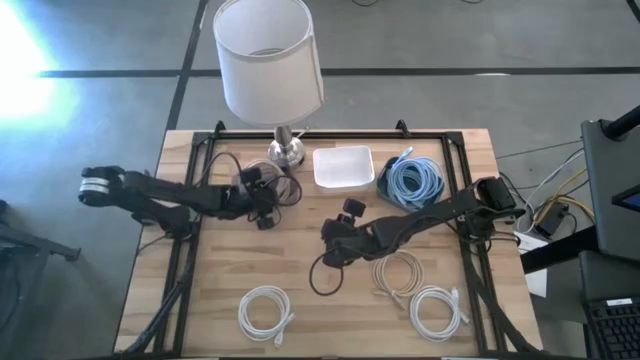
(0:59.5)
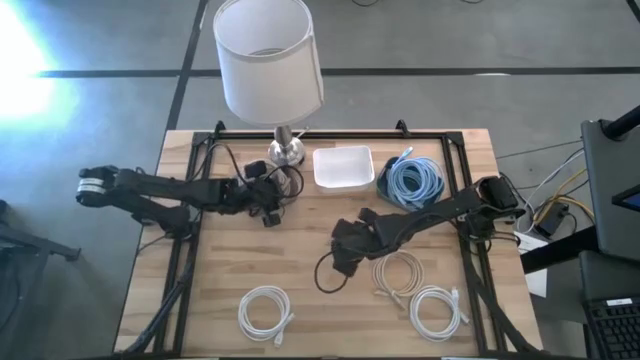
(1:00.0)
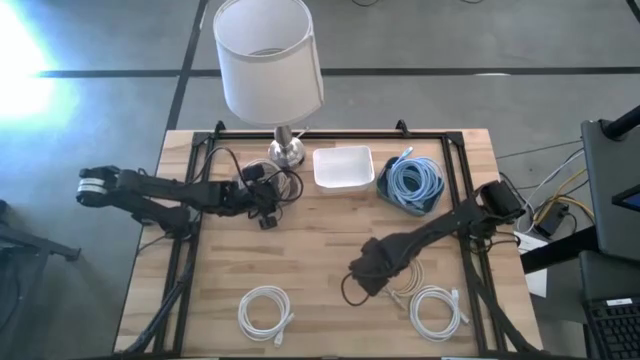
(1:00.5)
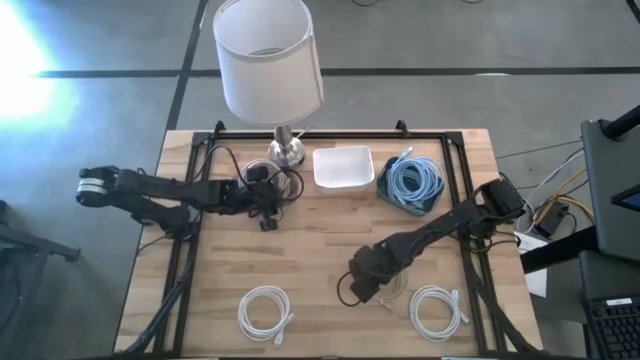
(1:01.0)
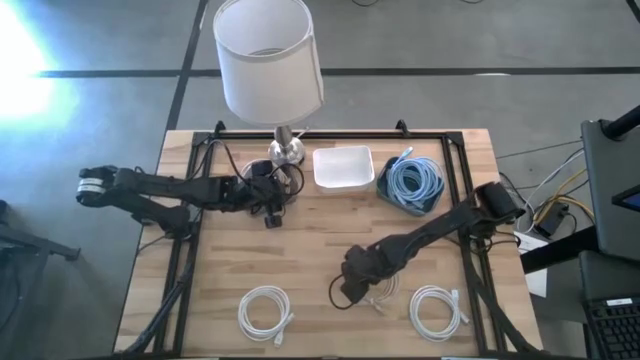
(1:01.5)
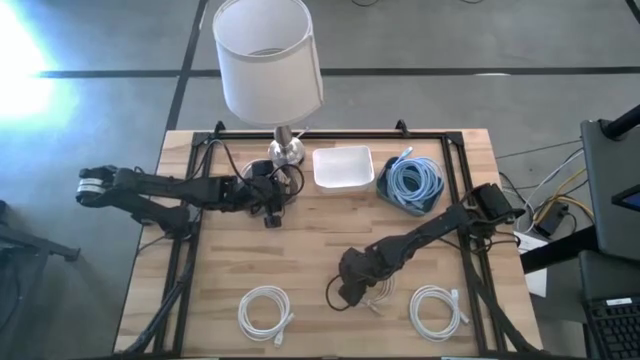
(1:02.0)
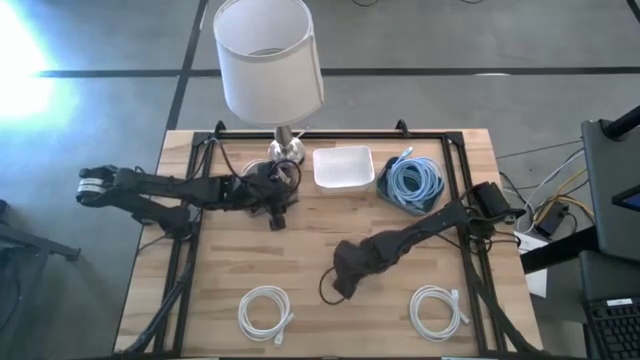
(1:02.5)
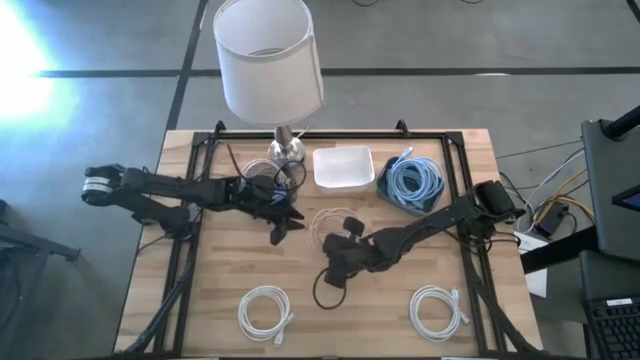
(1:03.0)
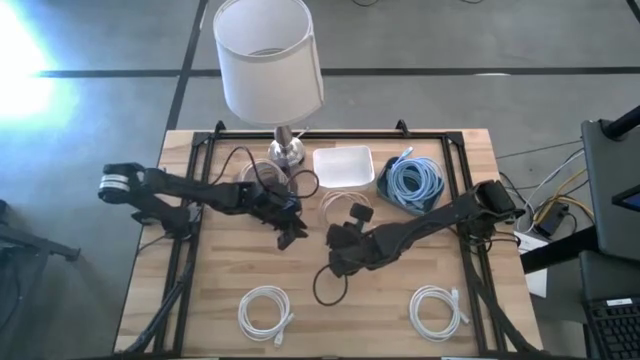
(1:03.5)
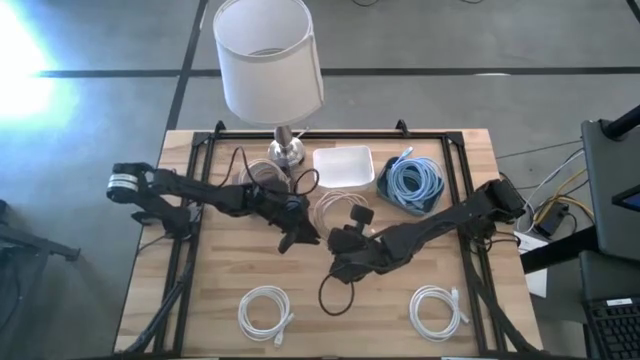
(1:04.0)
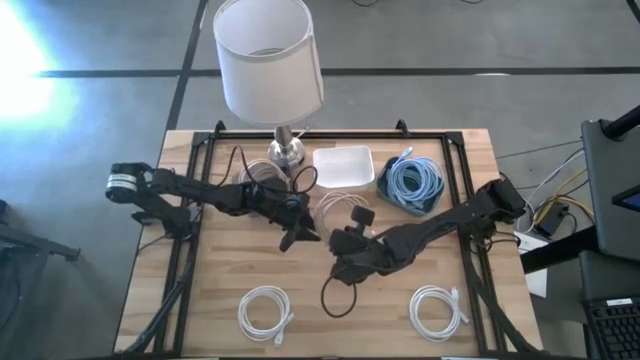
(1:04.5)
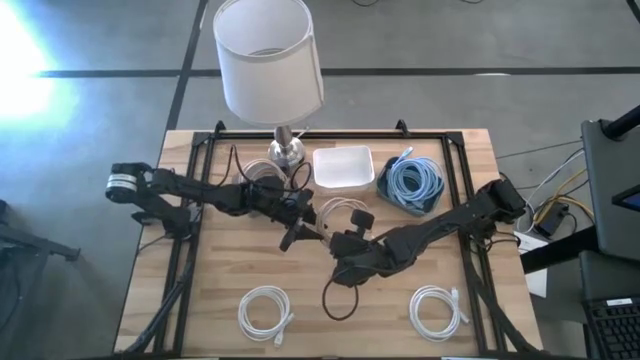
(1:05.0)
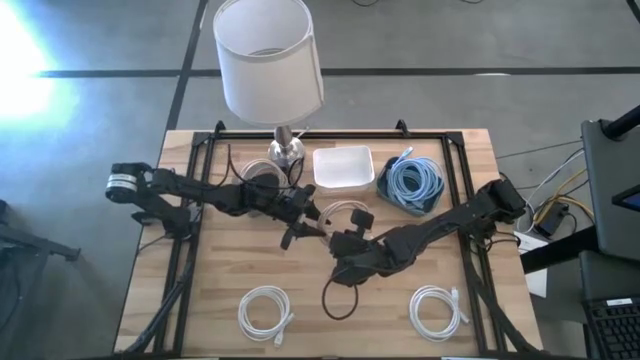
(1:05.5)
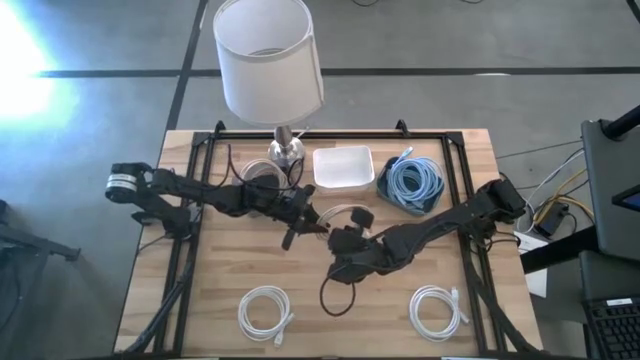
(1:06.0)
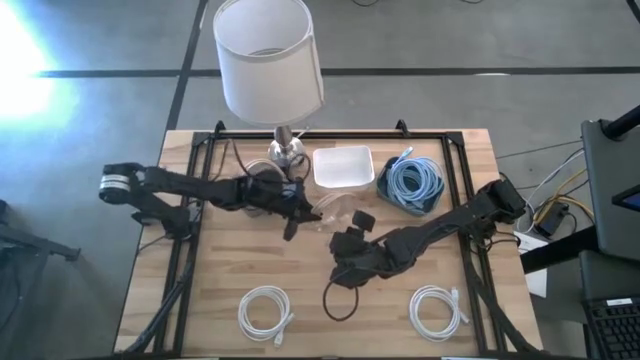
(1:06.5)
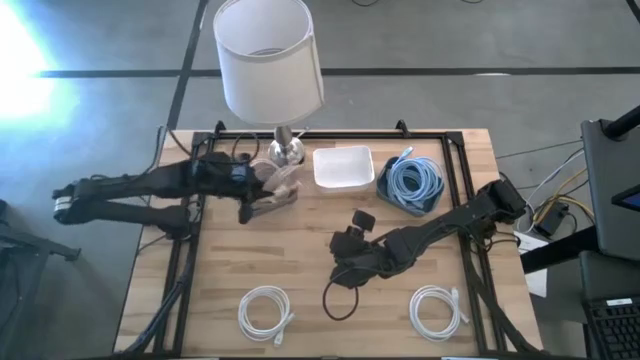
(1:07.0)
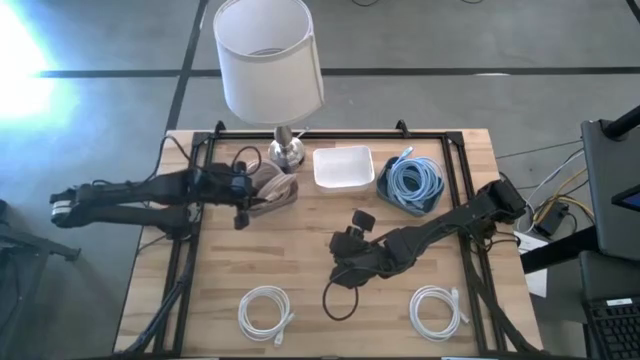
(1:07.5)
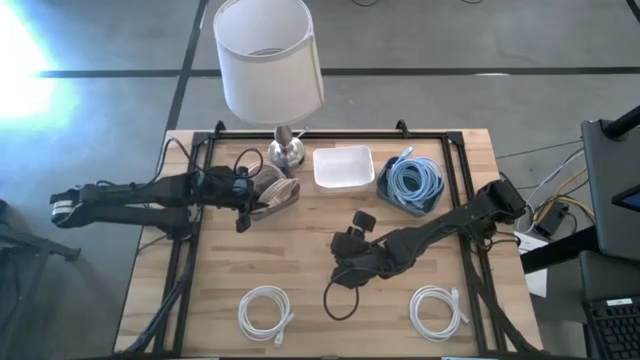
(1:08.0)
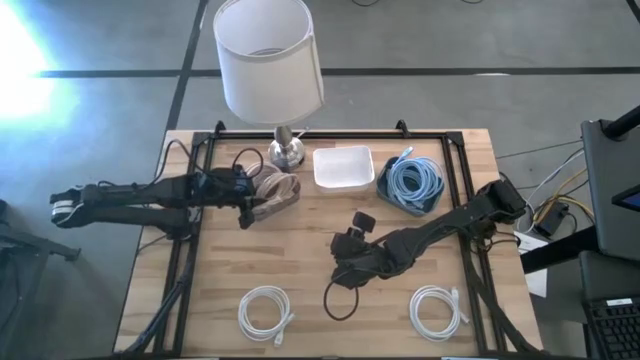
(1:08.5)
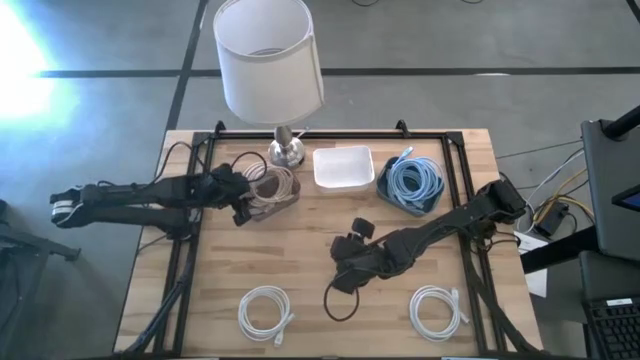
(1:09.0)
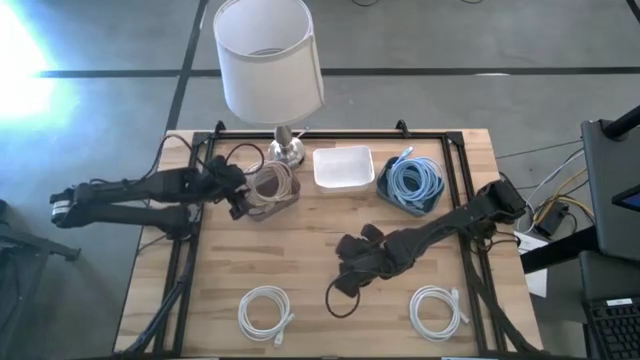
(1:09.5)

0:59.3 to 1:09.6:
Task: Sort HDMI cables
Put the brown hdmi cable into the black bin

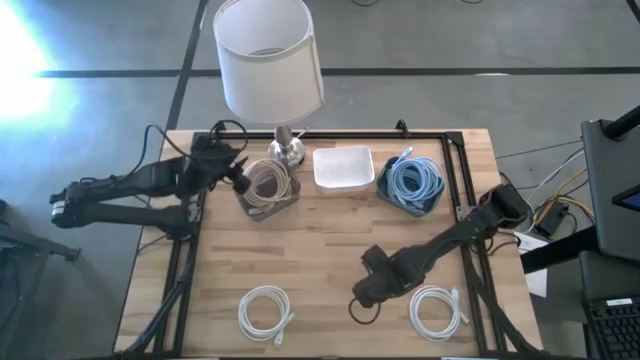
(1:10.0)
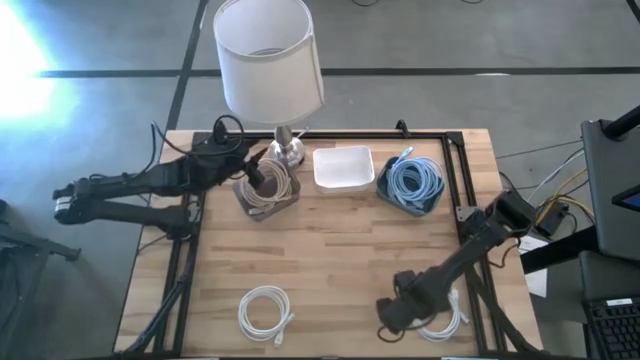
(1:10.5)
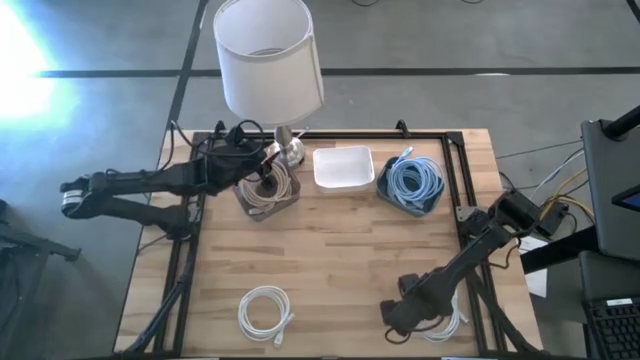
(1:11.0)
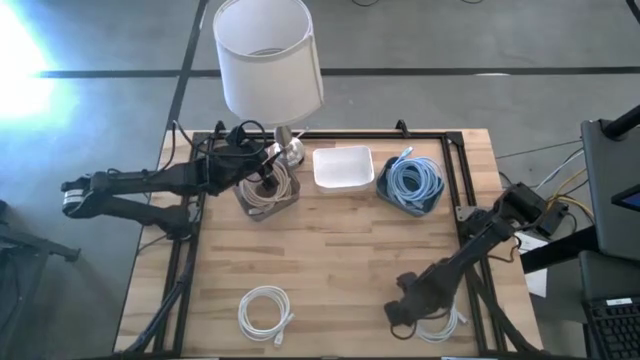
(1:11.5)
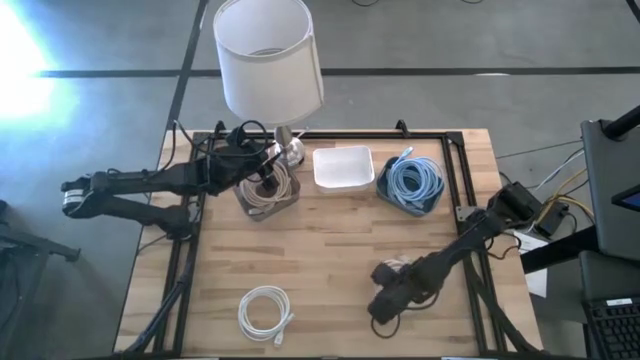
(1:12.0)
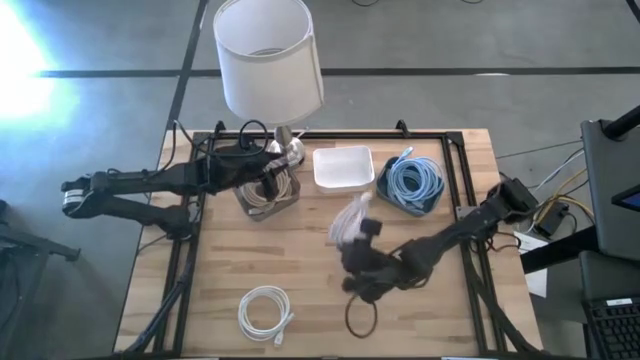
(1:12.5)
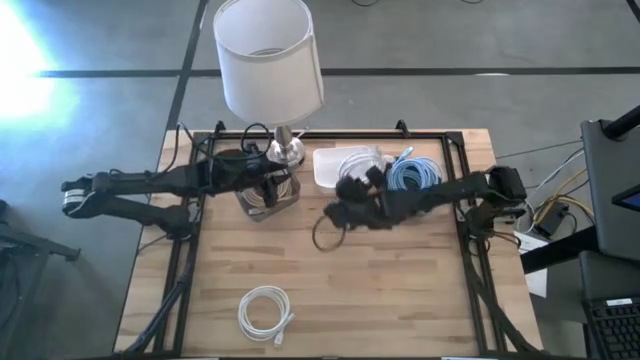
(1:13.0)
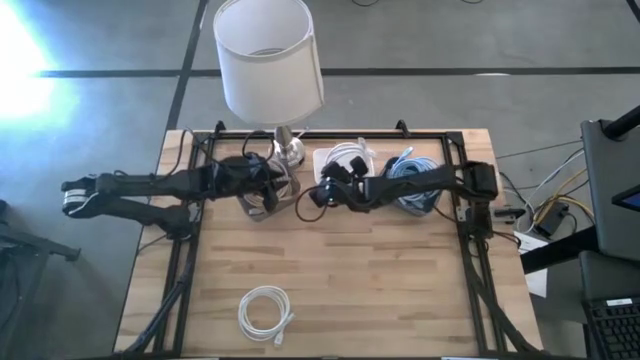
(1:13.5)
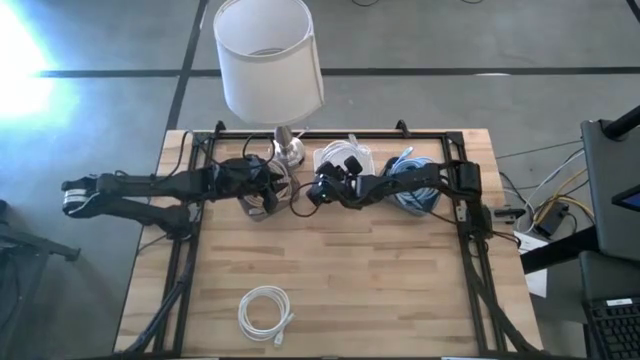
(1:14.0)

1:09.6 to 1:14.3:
Put the right white hdmi cable into the white bin

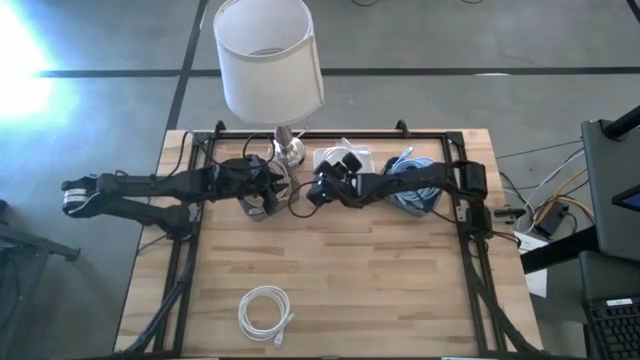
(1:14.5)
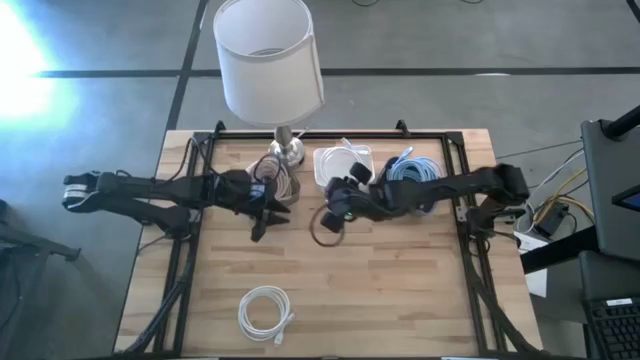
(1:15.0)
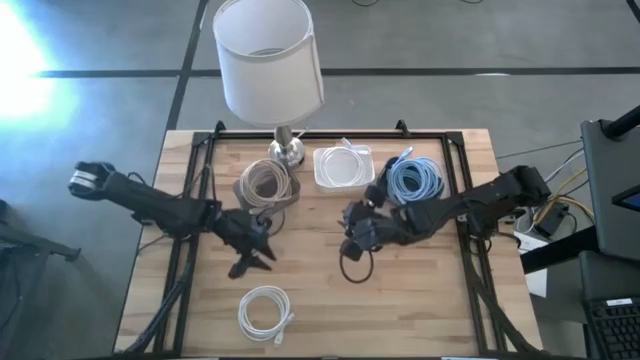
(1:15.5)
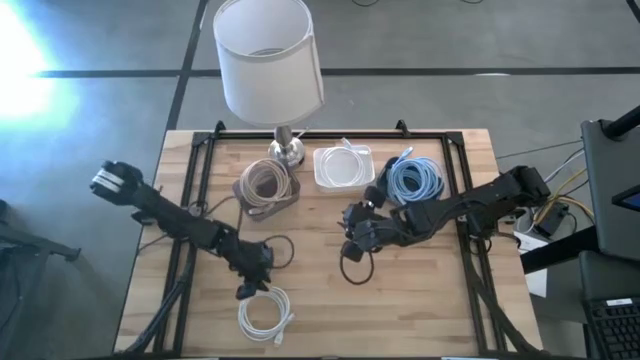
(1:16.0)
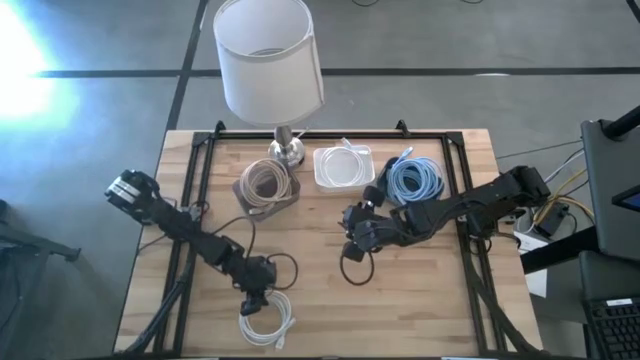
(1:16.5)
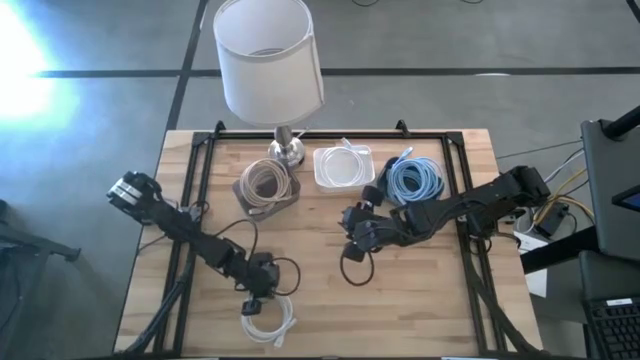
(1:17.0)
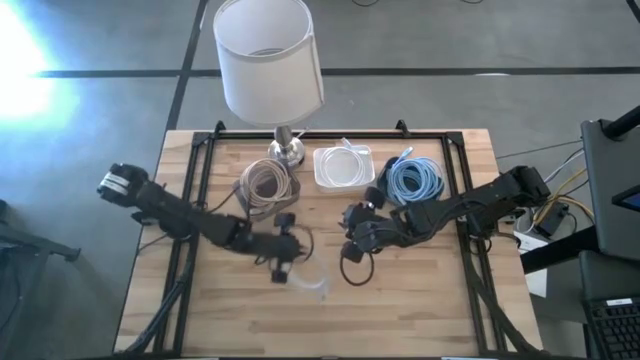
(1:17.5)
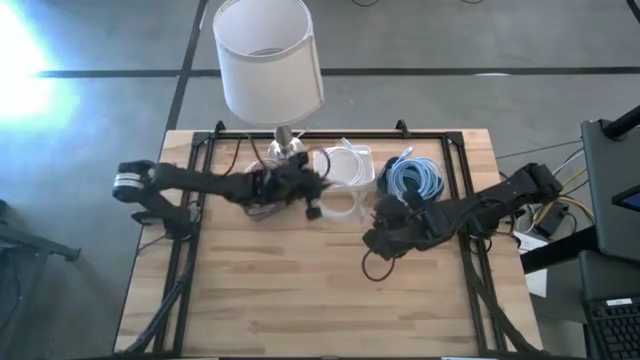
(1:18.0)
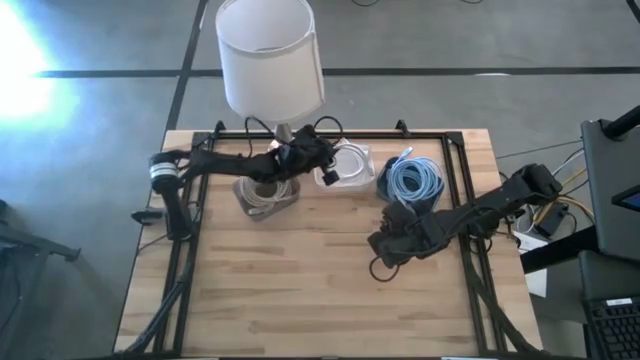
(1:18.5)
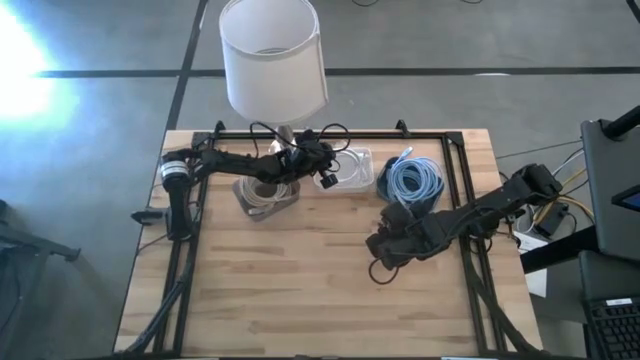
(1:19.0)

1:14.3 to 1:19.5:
Put the white hdmi cable into the white bin
